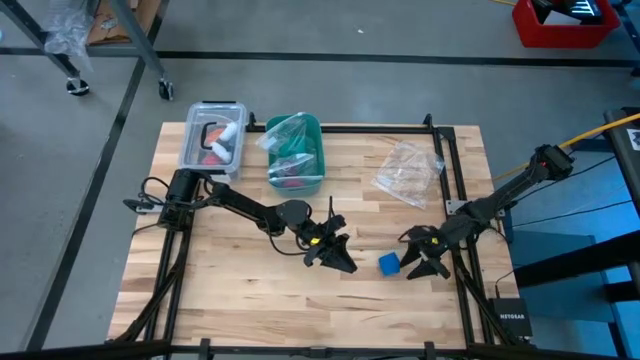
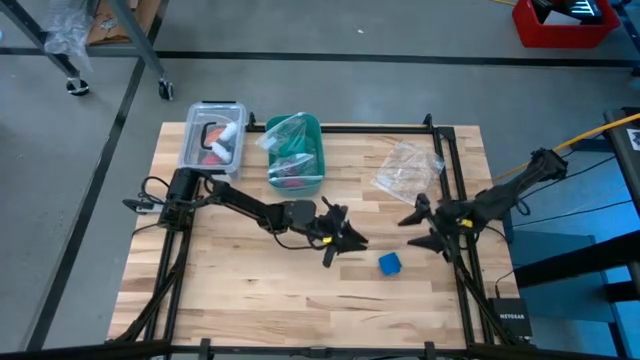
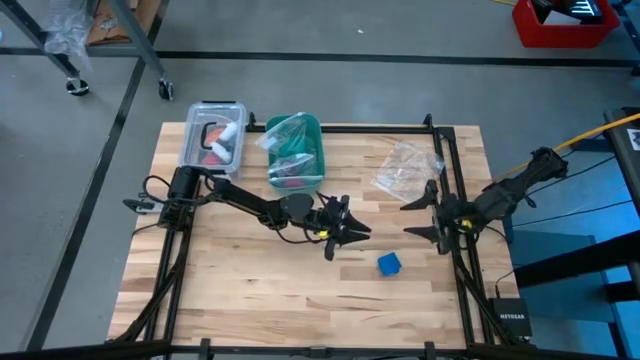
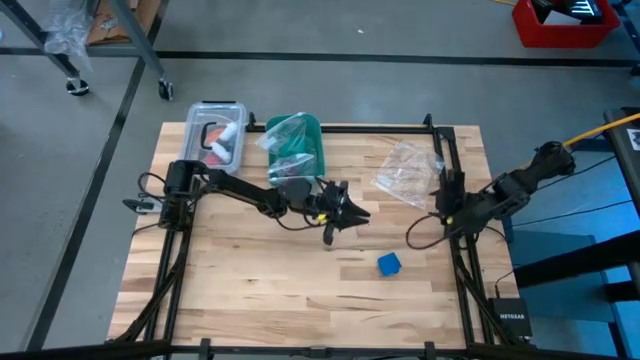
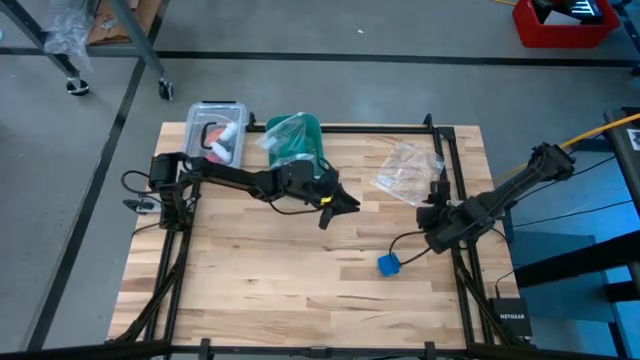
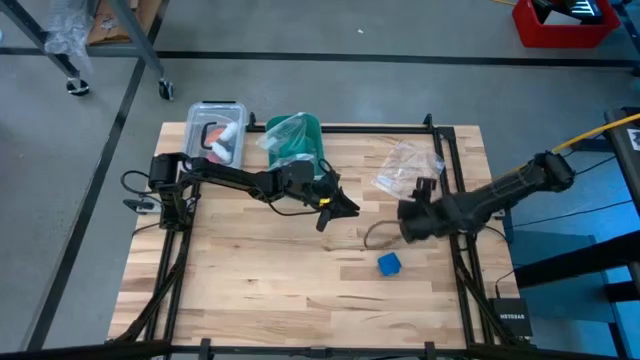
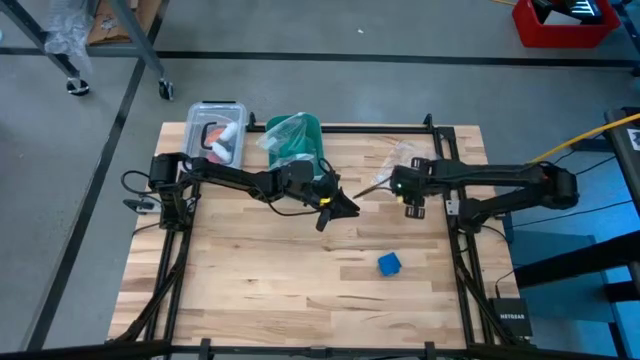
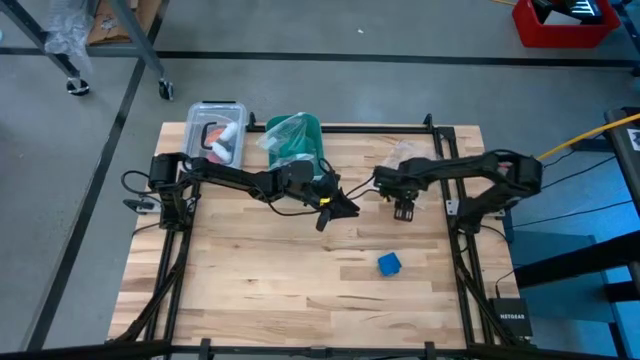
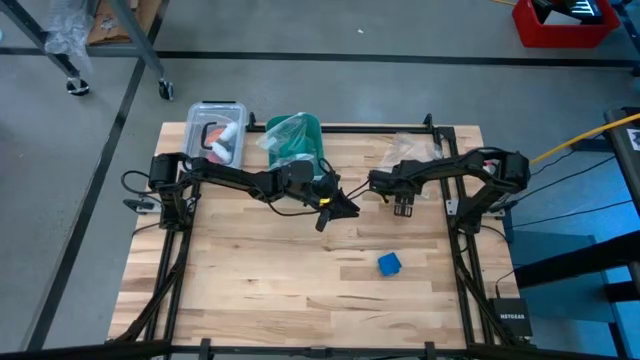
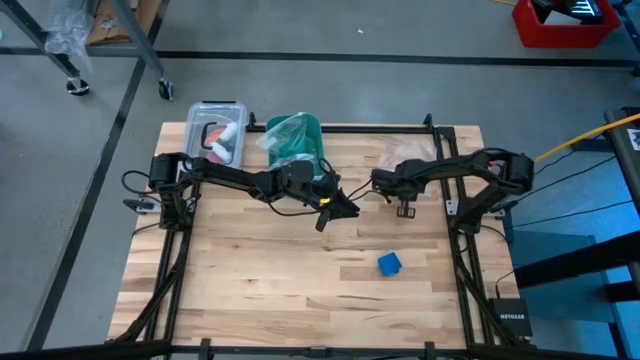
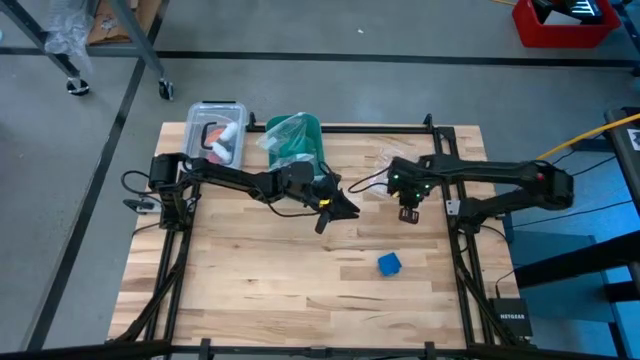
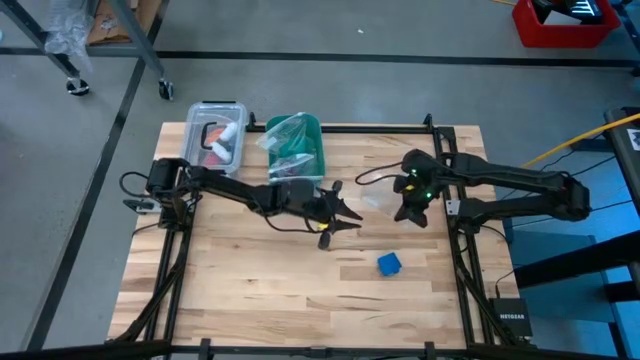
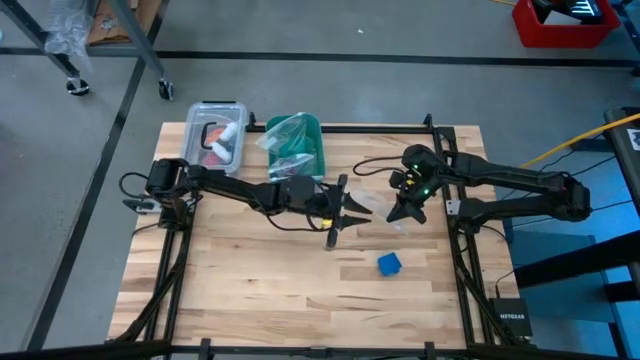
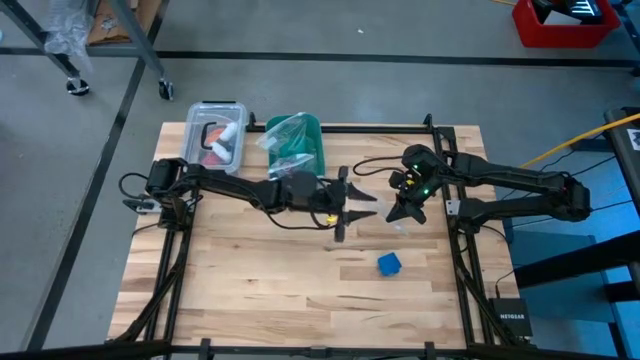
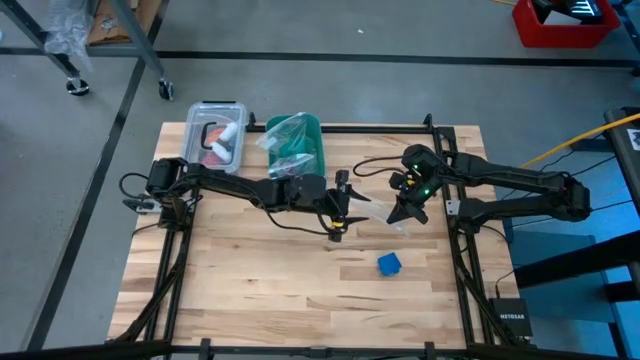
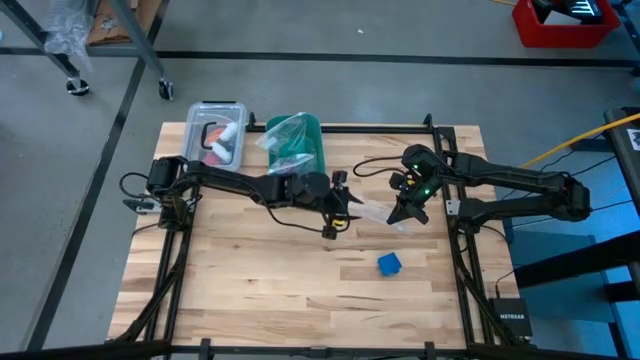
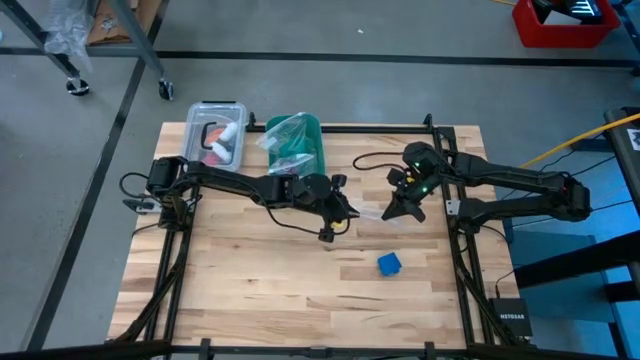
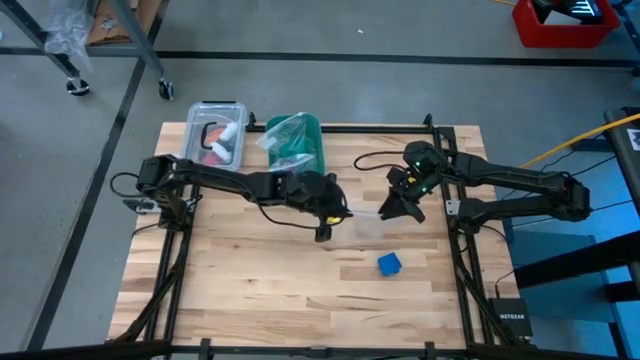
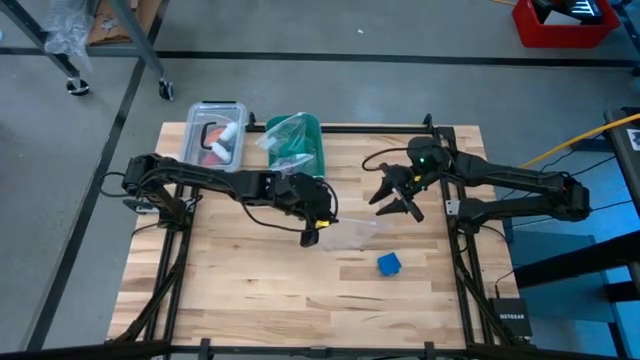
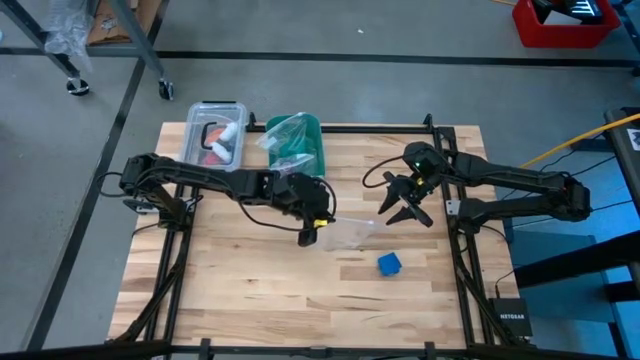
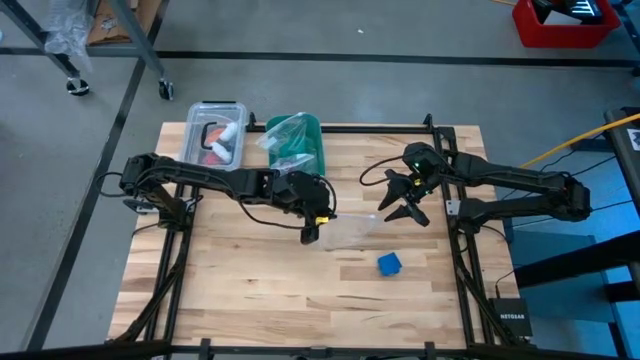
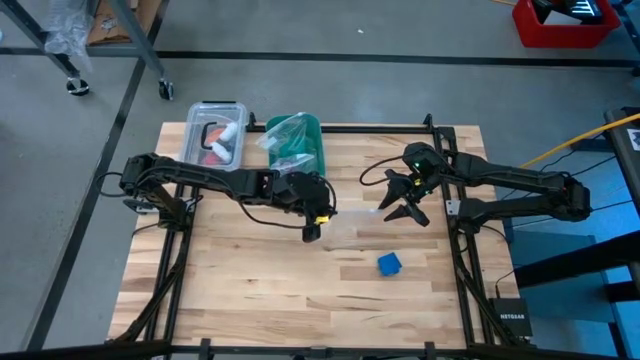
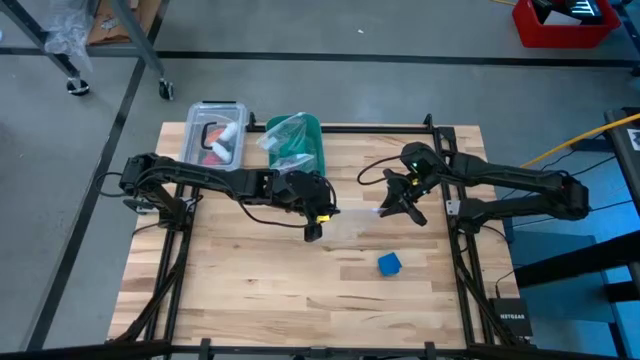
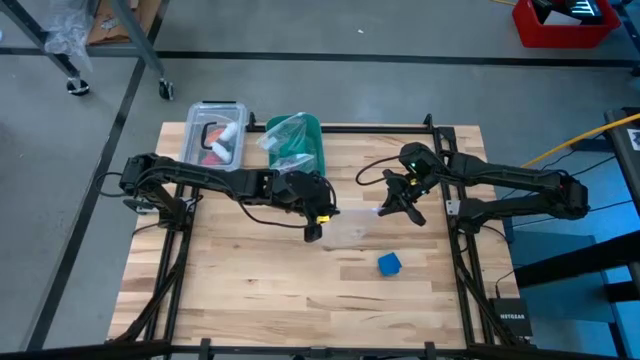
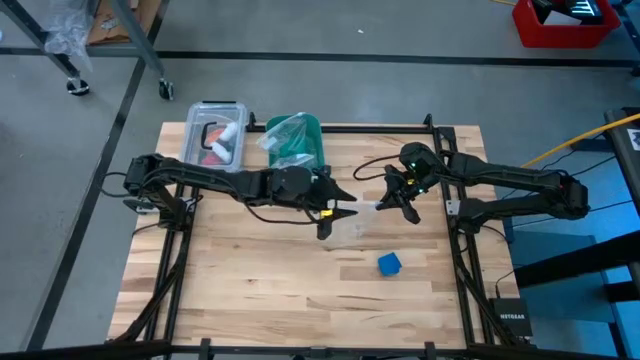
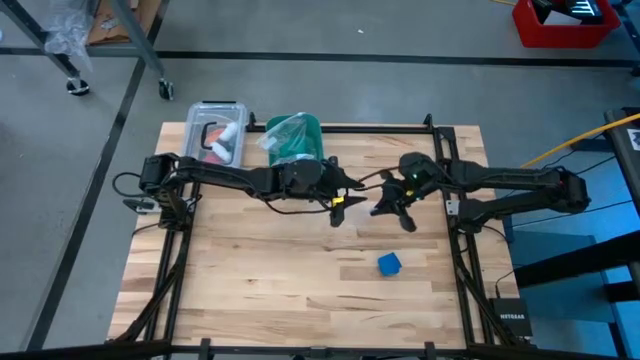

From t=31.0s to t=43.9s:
Task: Roll bandage
Open the transparent zip bag

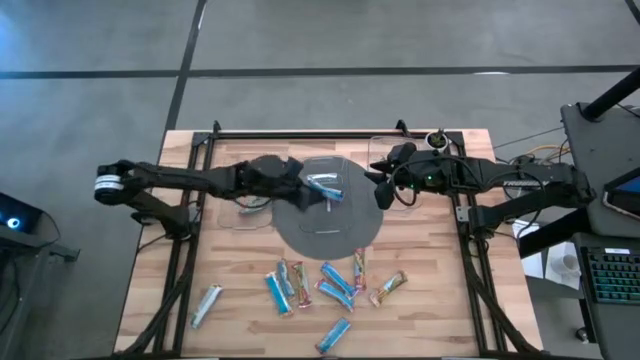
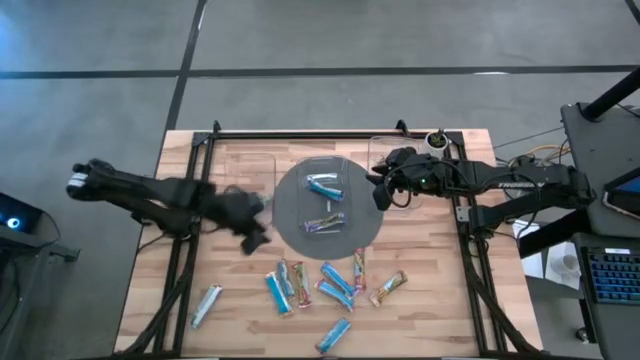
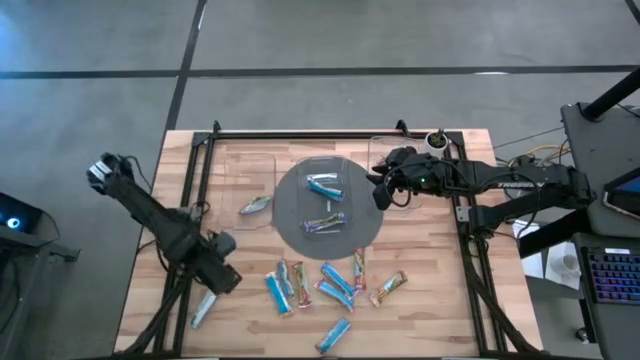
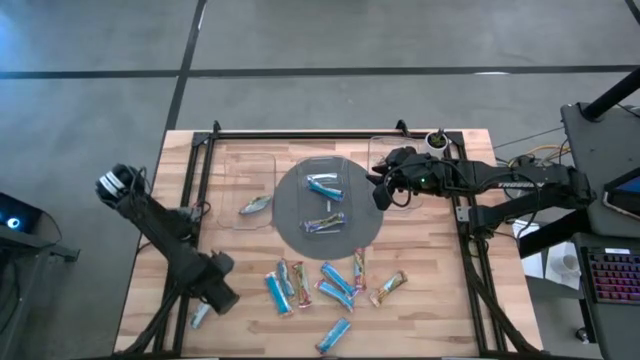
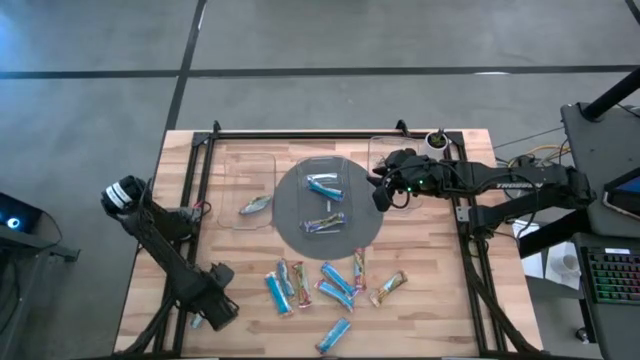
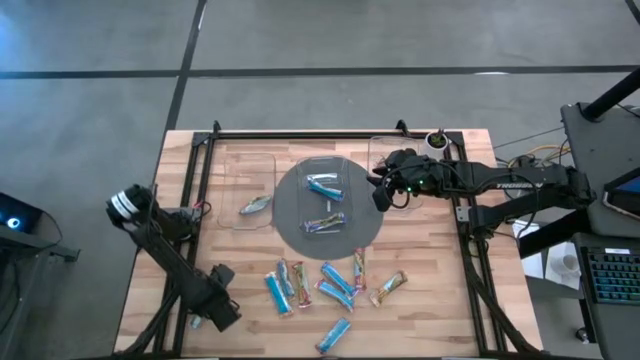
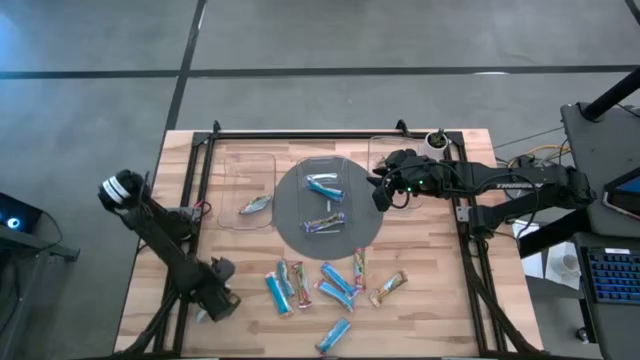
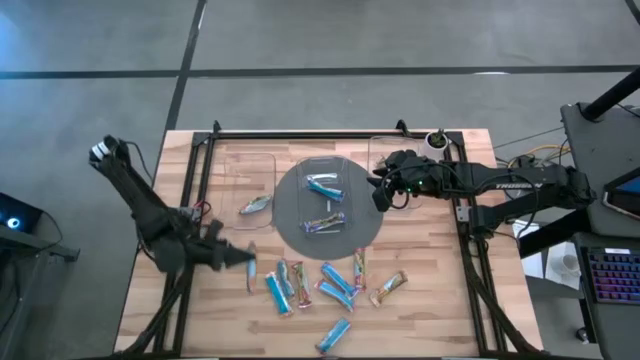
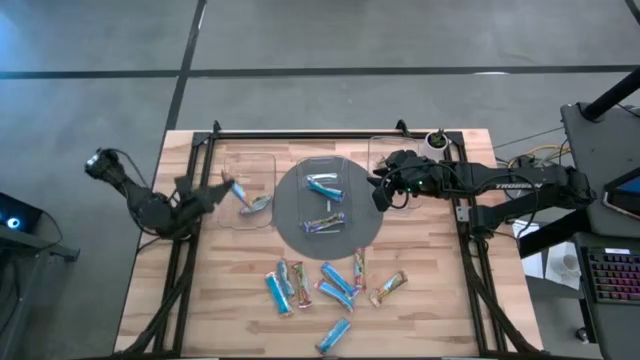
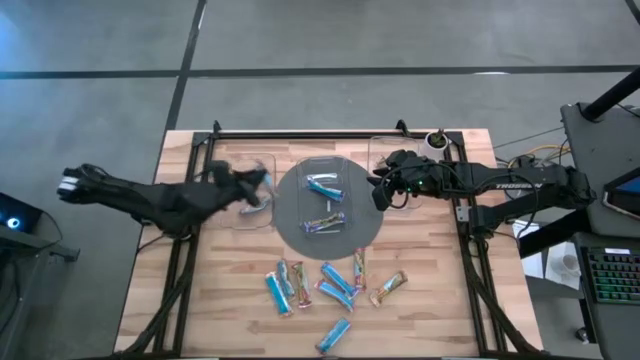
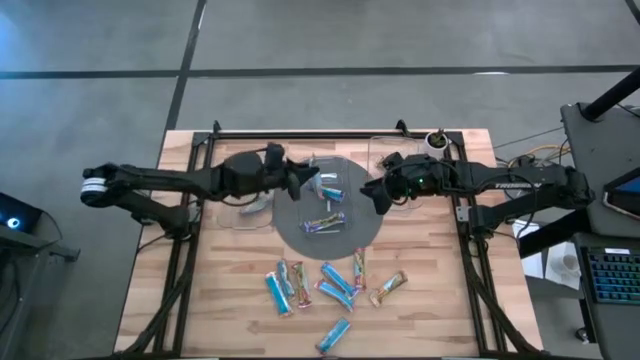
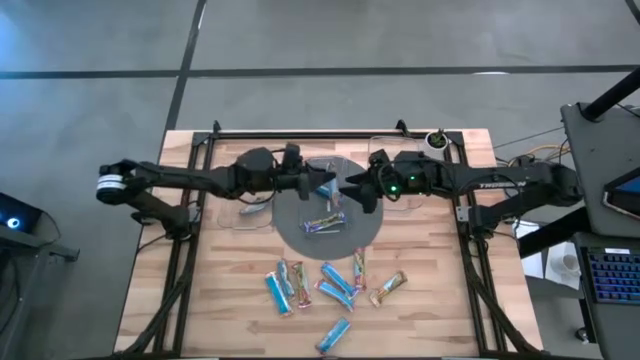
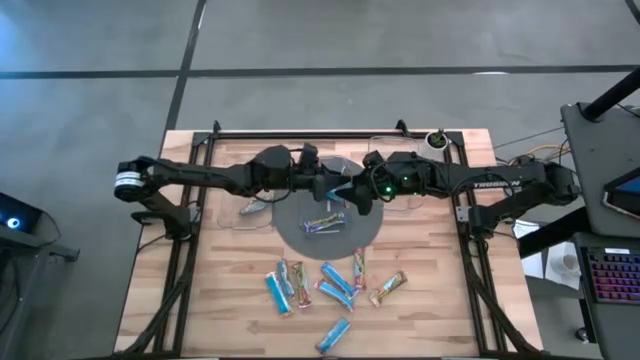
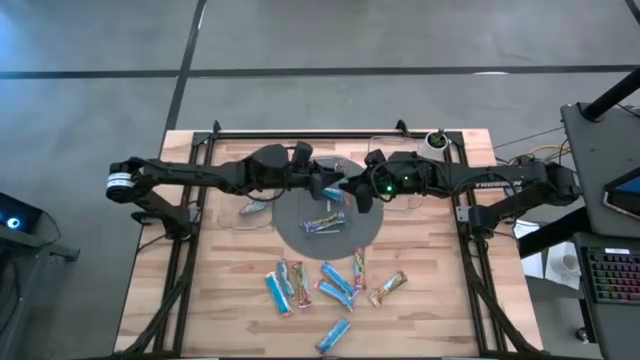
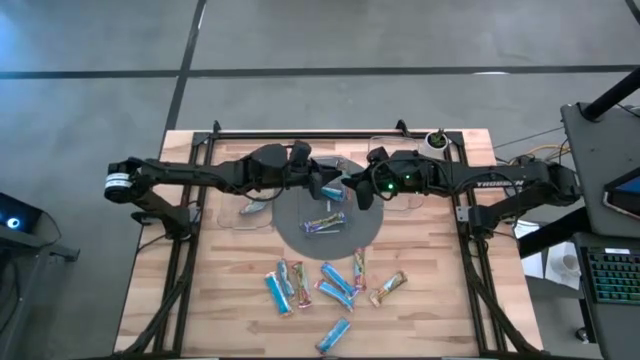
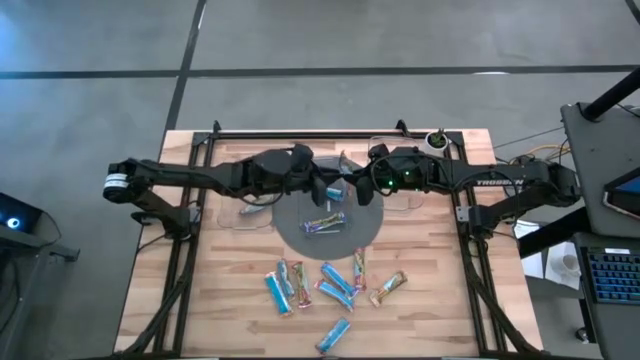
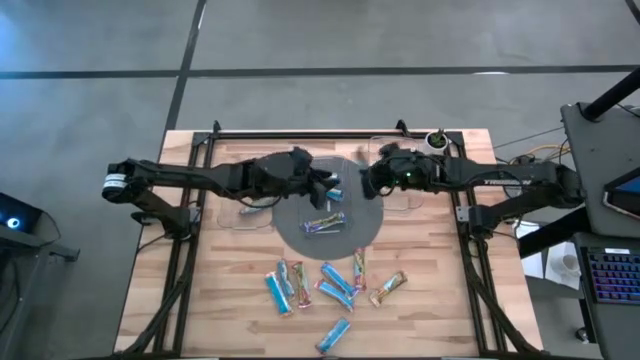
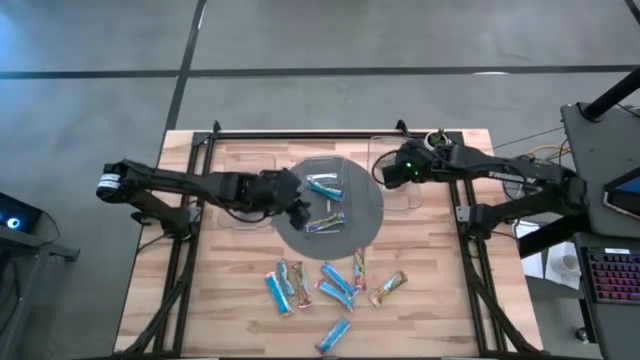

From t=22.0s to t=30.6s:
Task: Pick and place Granola Bars by type
Put the yellow granola bar into the right transparent bin
